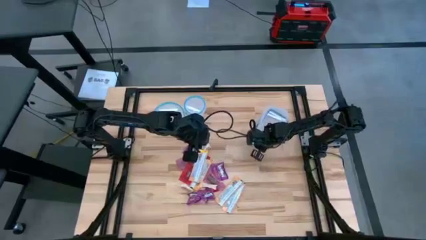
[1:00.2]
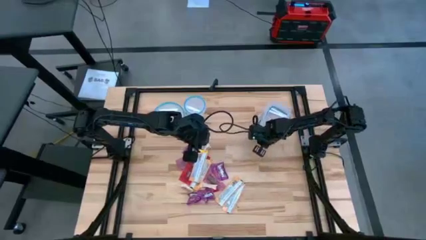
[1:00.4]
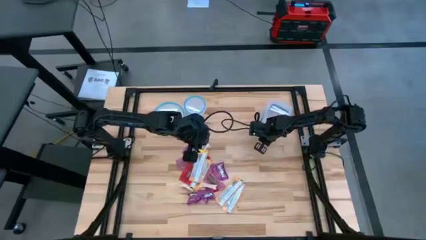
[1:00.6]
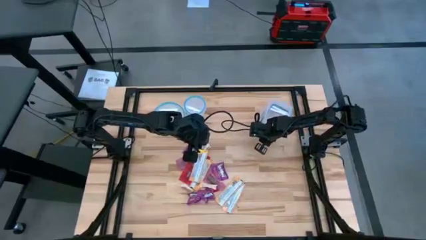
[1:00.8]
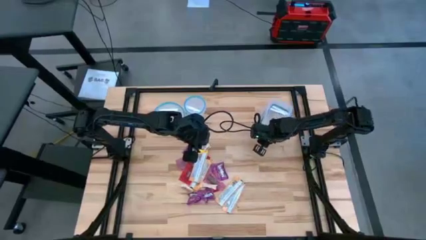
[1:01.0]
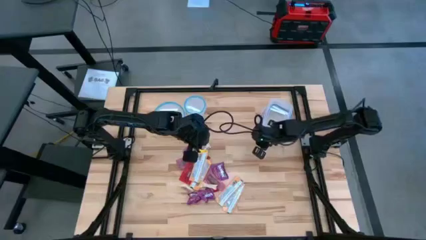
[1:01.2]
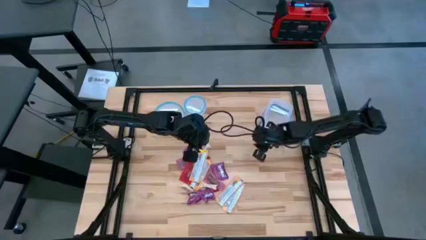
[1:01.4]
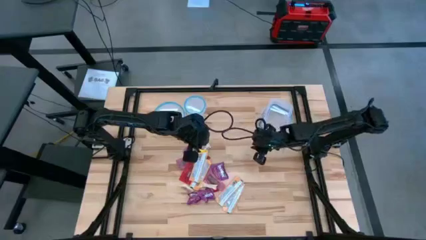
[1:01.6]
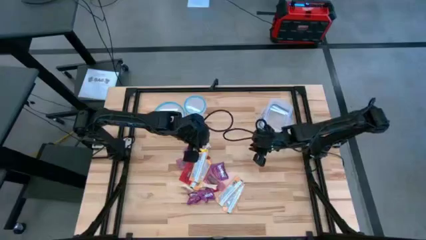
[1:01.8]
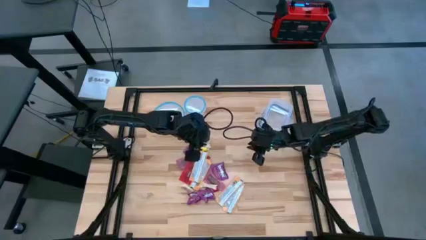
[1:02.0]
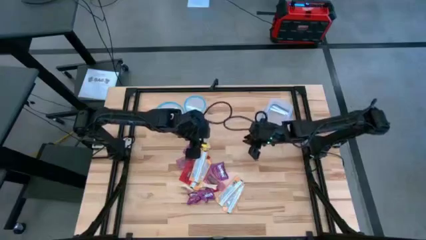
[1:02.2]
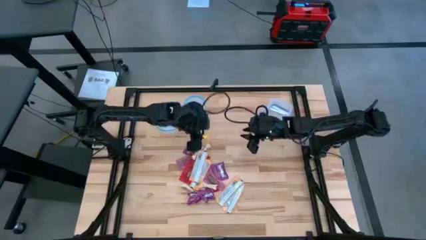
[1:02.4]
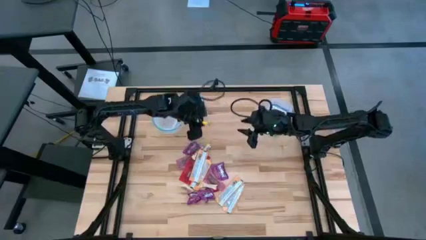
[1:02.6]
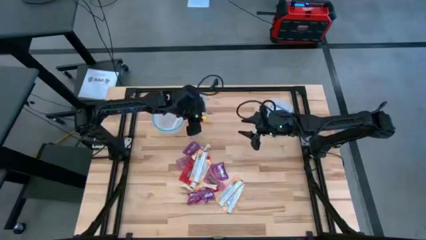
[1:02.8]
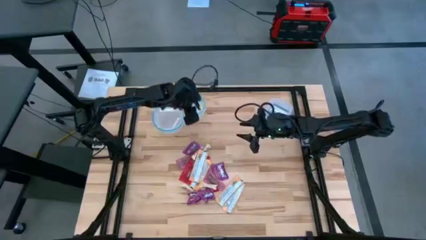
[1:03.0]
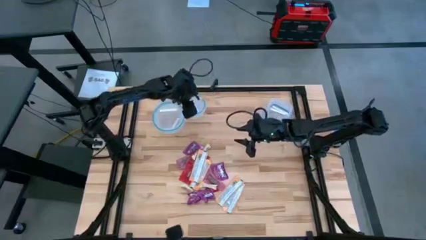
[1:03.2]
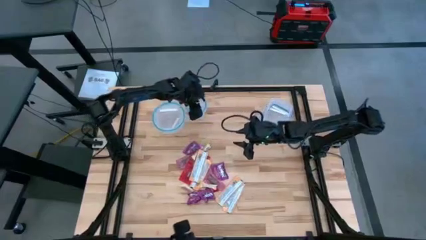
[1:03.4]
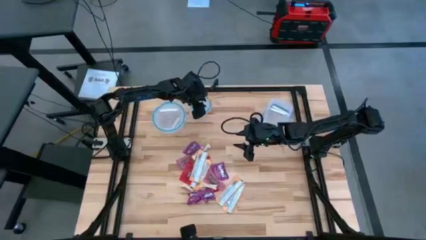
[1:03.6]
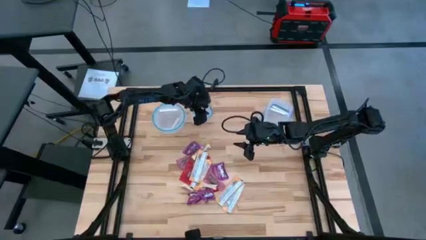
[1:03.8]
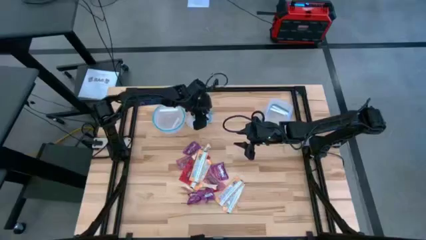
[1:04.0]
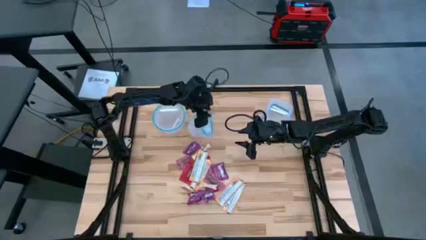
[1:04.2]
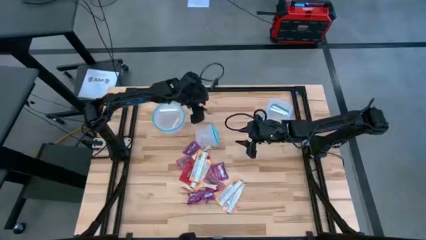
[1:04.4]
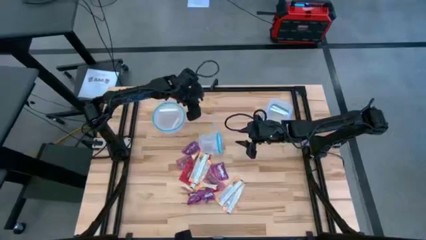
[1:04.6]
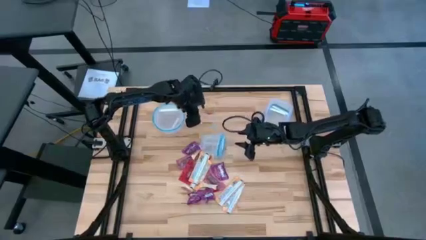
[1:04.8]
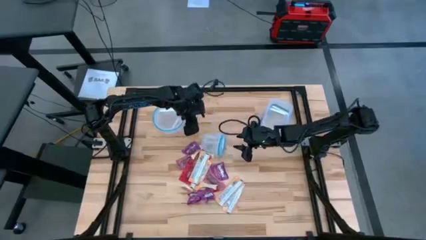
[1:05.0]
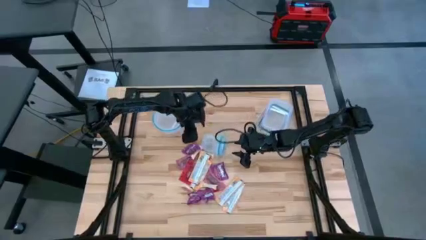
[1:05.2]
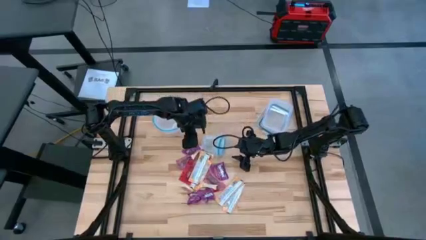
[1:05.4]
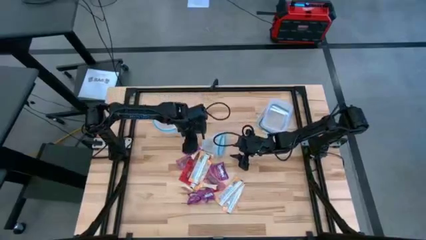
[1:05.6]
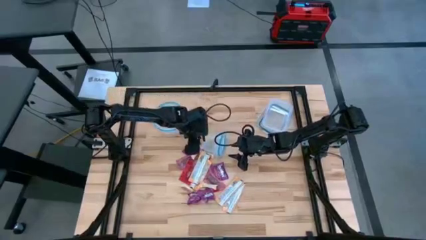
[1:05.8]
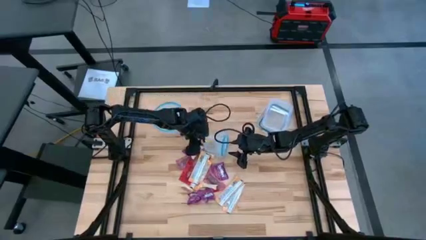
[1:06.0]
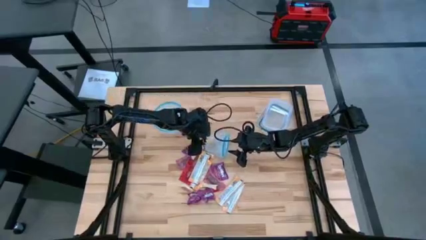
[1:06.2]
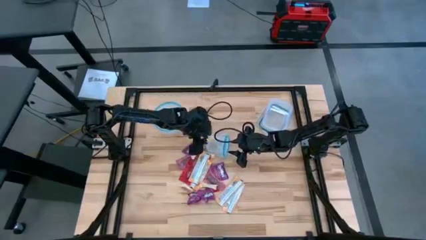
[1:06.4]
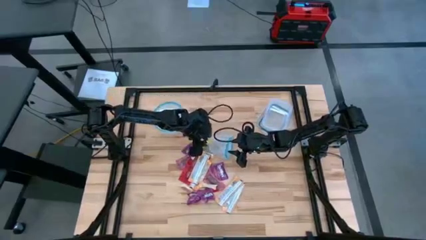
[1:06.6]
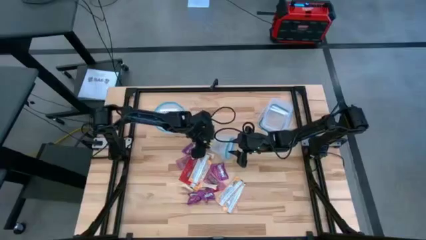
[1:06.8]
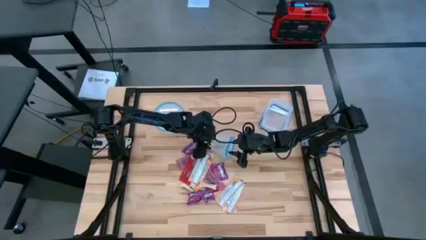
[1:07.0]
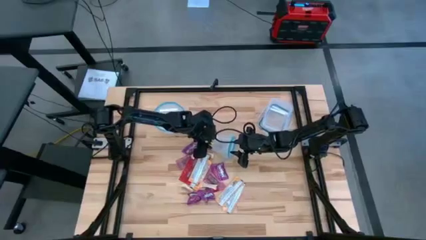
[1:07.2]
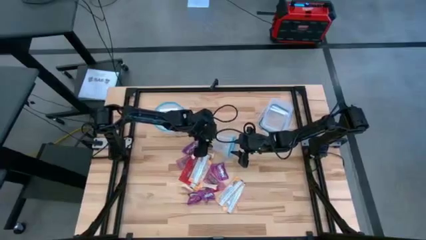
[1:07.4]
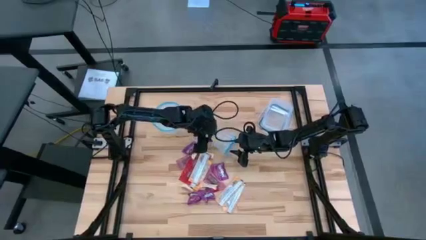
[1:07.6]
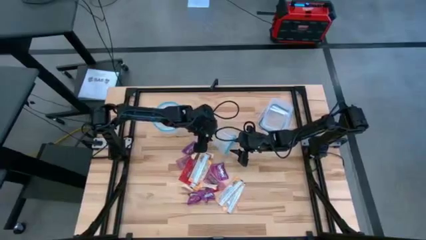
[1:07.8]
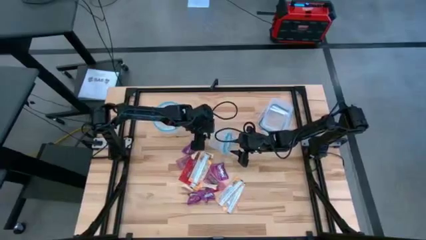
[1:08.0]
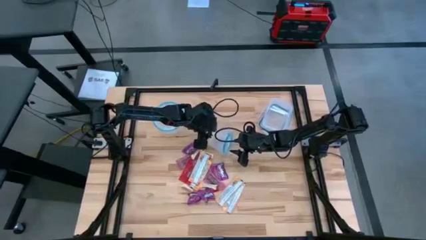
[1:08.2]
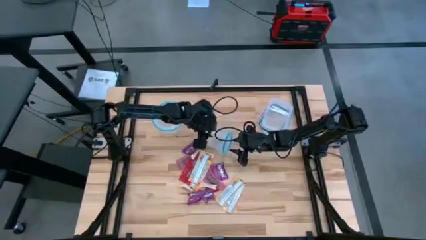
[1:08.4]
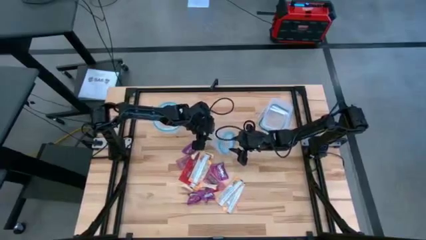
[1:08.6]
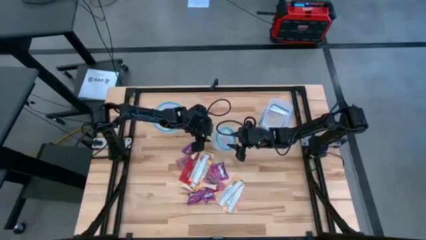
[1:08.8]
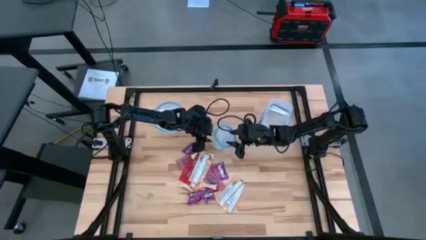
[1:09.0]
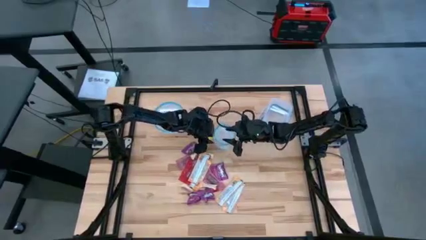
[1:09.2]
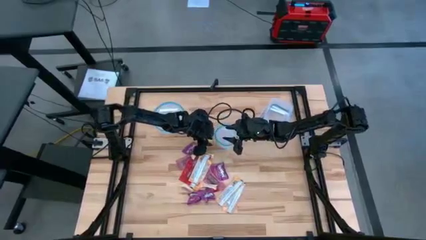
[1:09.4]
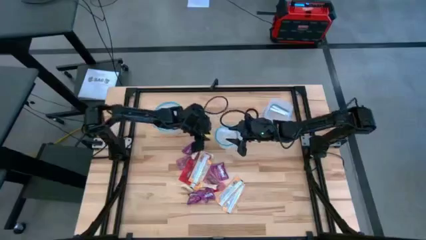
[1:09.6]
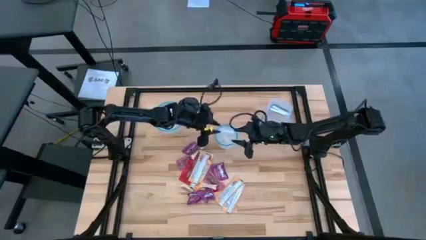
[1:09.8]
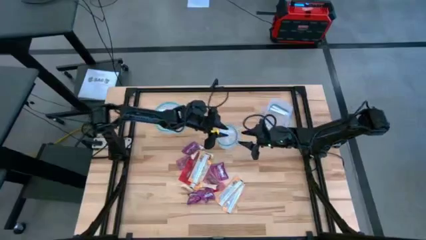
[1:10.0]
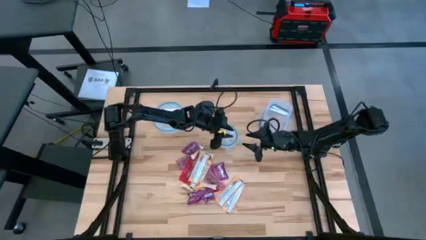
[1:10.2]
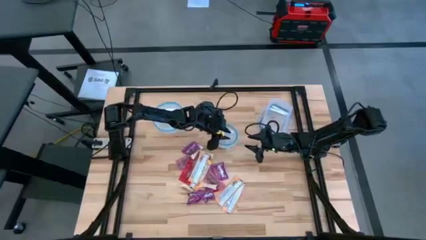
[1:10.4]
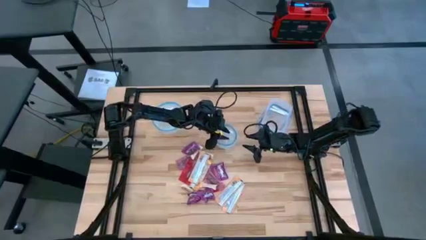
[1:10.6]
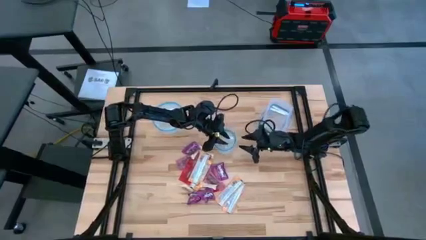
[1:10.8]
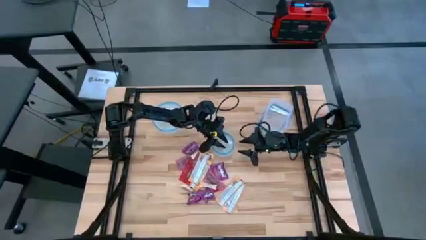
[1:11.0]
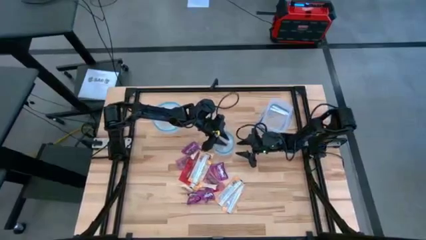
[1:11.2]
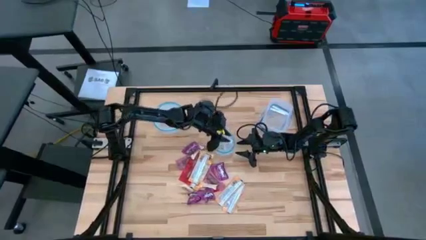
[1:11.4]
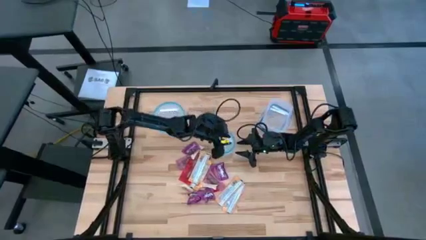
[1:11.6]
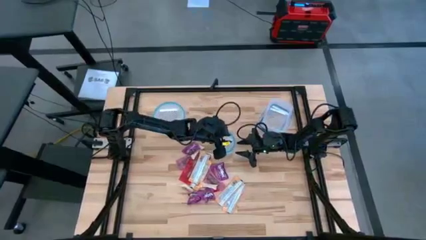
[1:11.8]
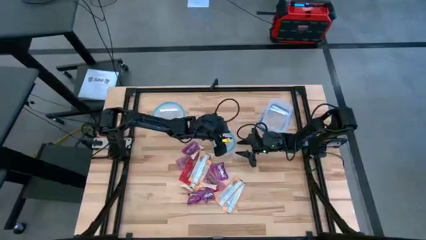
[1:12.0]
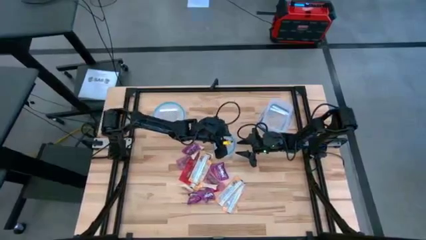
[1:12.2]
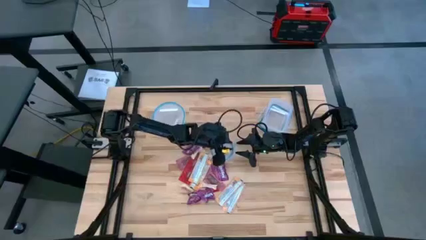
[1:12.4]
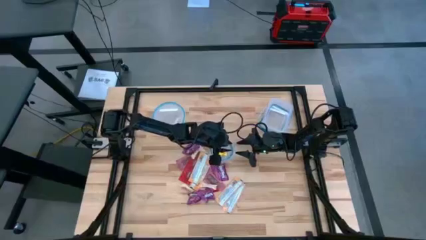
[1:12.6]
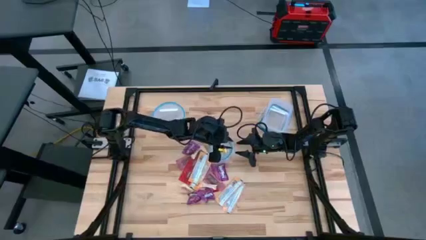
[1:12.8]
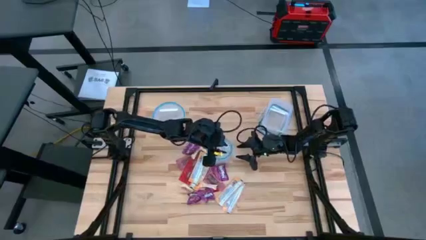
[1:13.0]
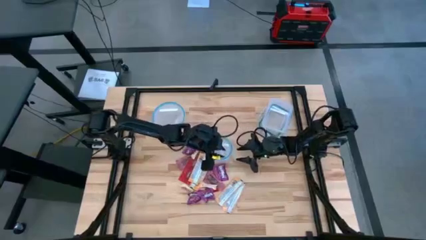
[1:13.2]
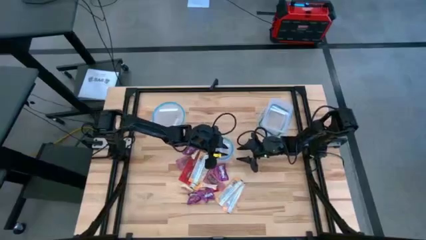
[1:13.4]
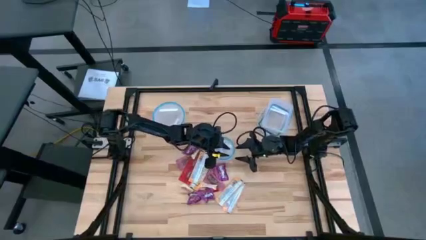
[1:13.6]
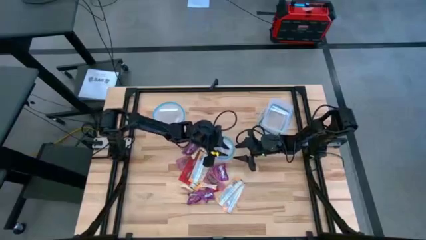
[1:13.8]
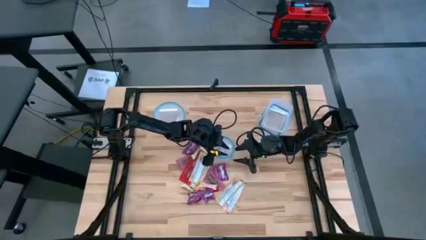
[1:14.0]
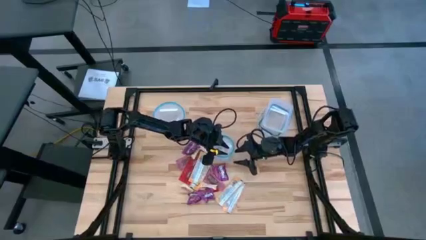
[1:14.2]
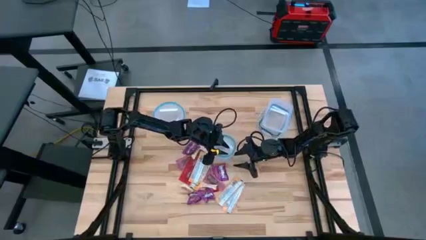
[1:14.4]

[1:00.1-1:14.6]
Task: Sort candy
Open the small round transparent bin

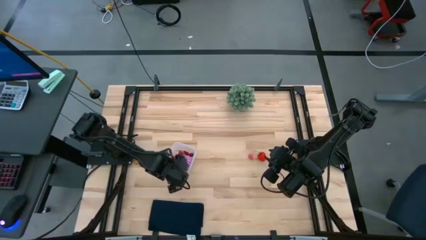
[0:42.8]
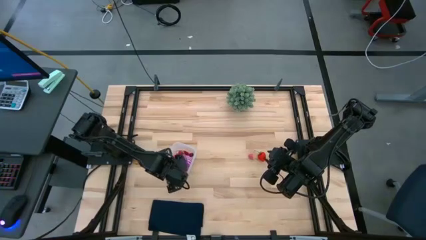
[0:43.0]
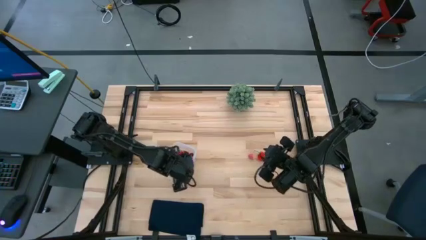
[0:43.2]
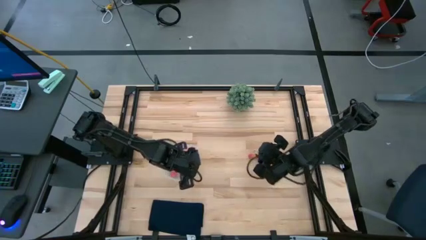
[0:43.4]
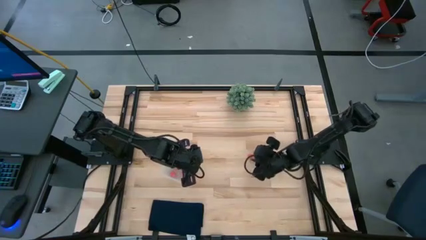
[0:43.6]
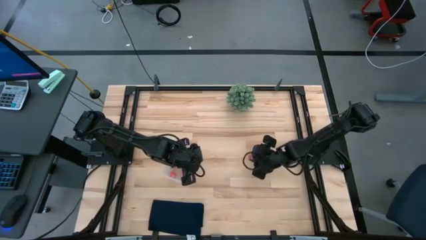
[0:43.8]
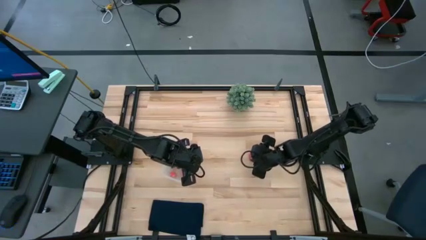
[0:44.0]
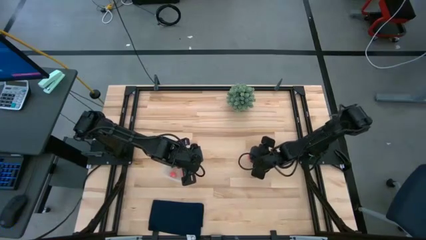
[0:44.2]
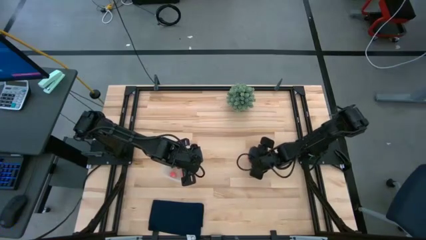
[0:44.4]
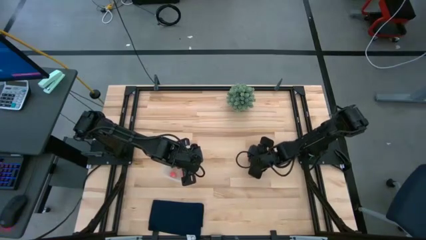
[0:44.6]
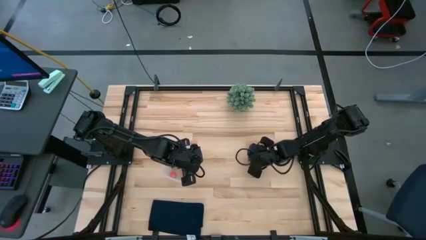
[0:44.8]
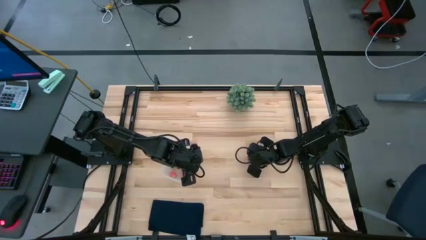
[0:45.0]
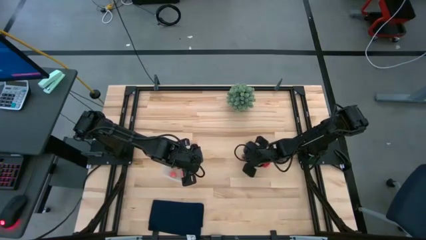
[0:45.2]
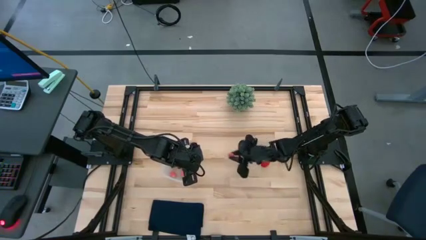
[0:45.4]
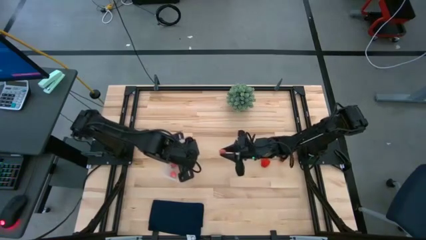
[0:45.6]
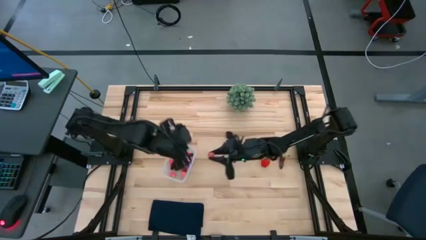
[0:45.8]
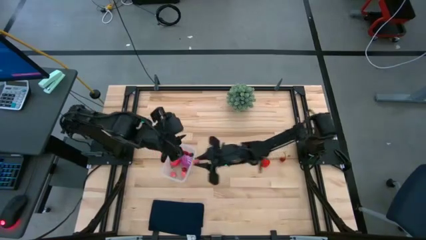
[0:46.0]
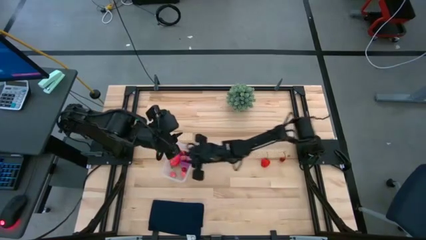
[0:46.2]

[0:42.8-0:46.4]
Task: Pick and placing Produce into tupperware
Put the pink peach into the transparent bin
